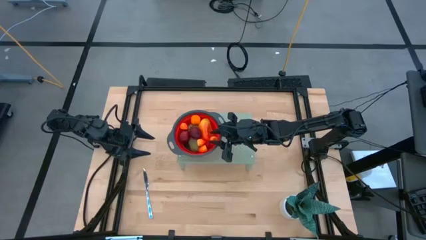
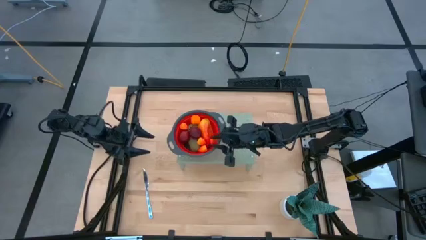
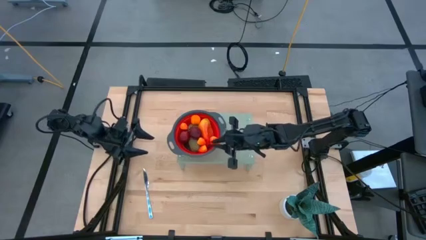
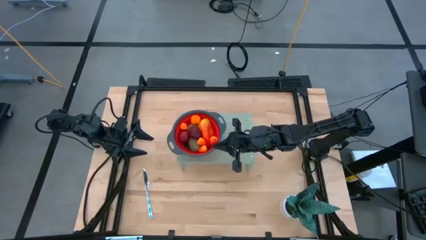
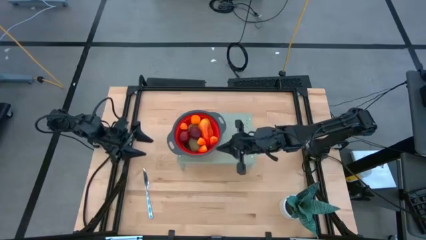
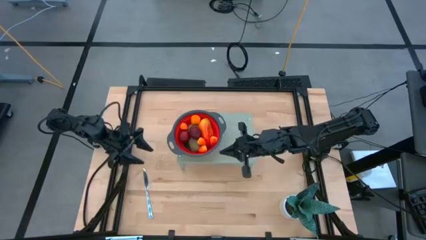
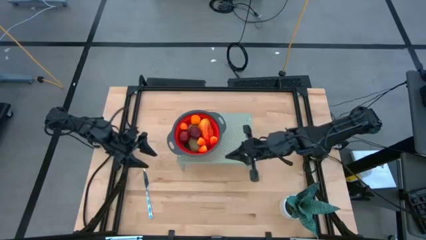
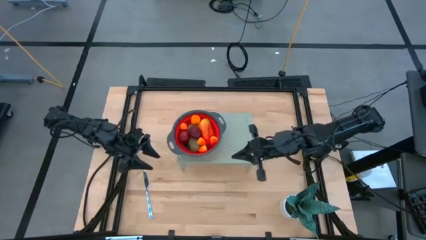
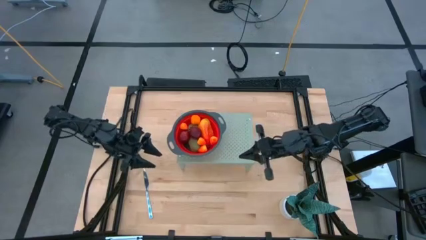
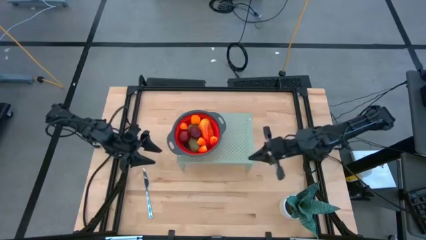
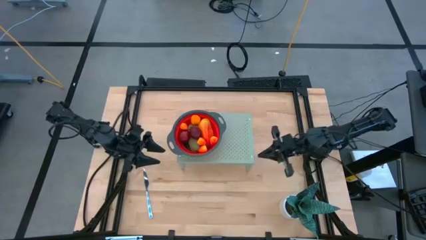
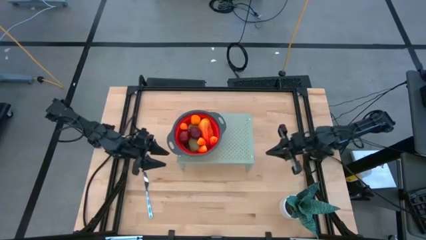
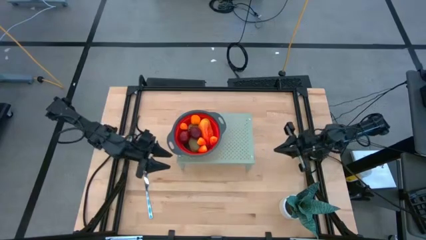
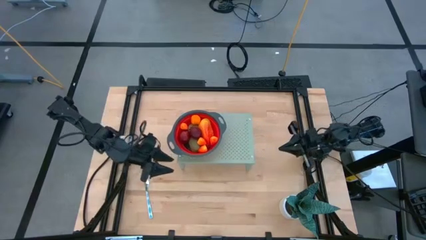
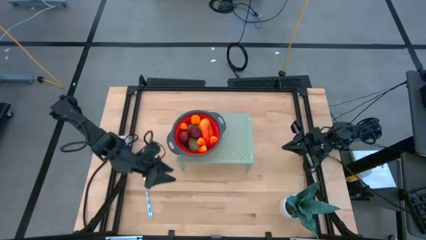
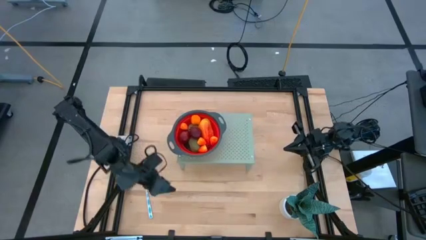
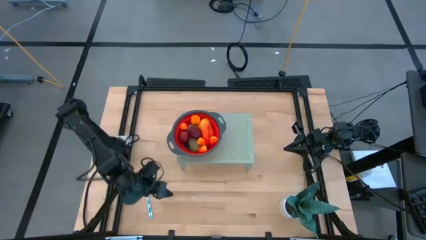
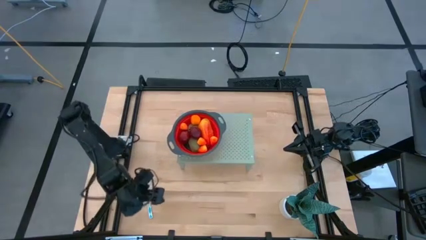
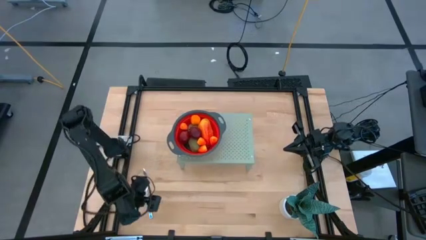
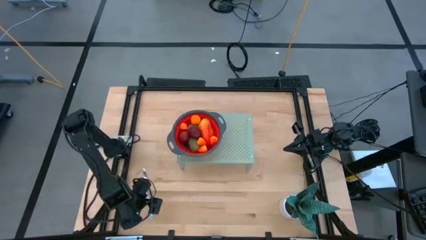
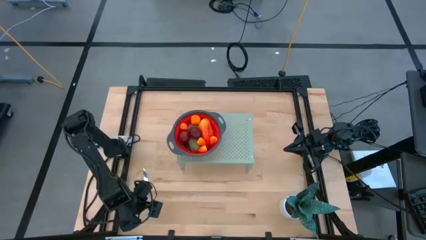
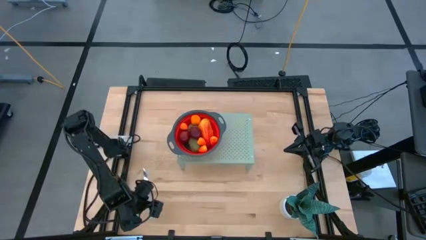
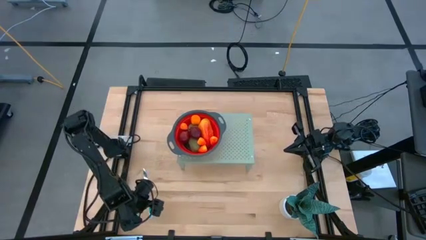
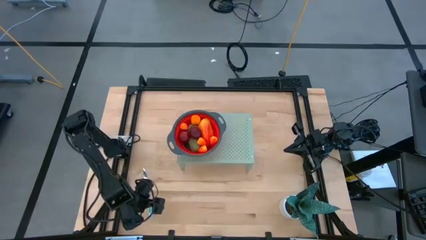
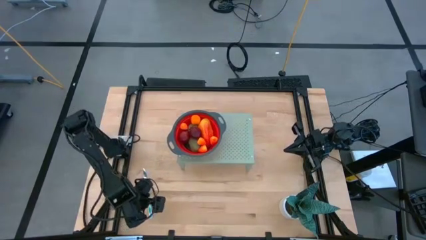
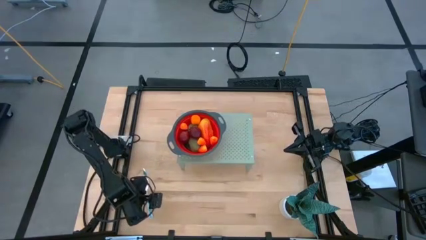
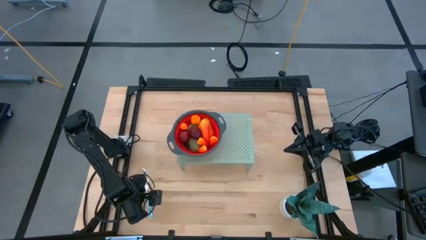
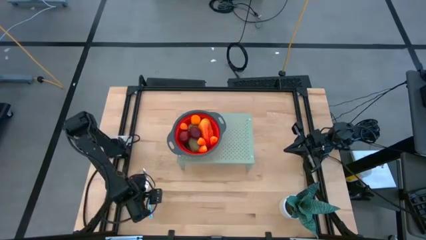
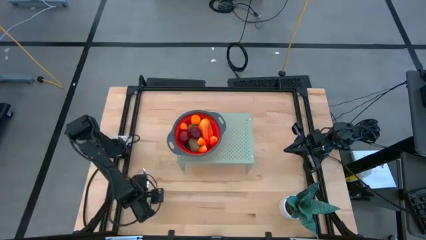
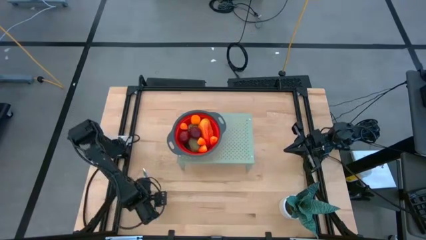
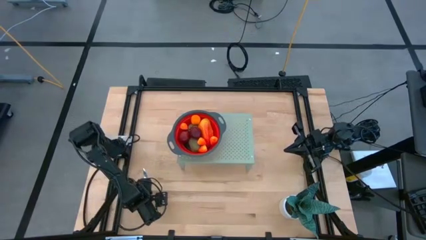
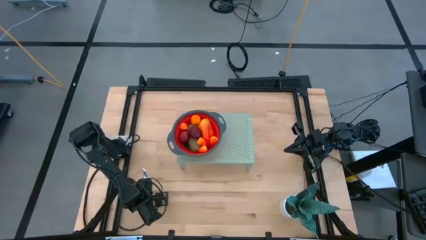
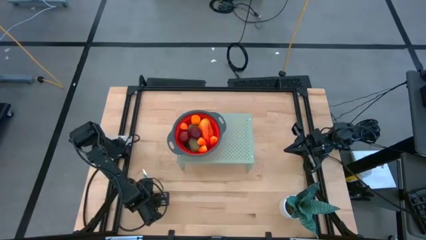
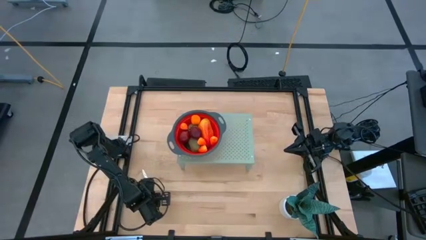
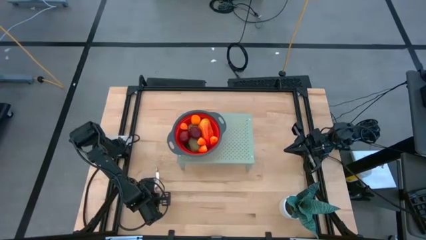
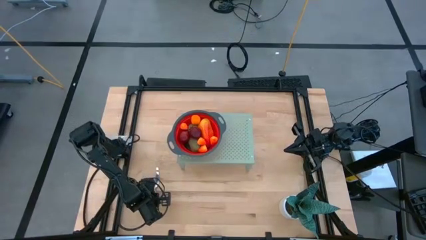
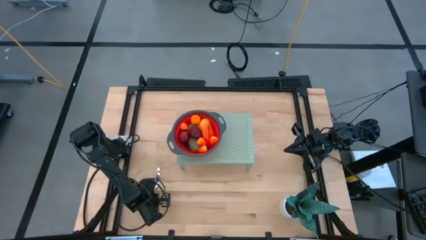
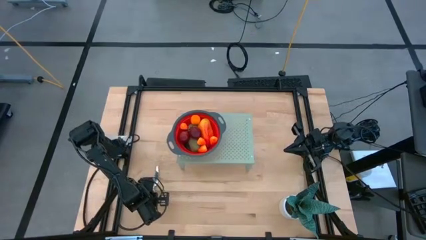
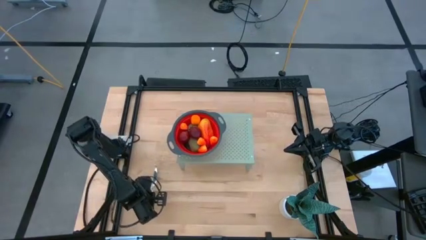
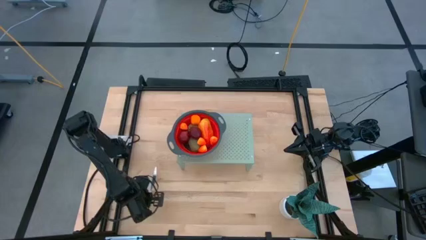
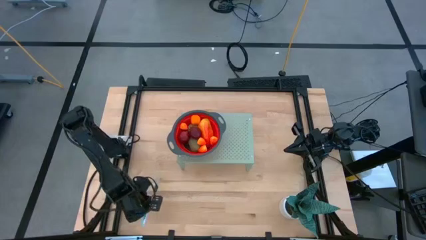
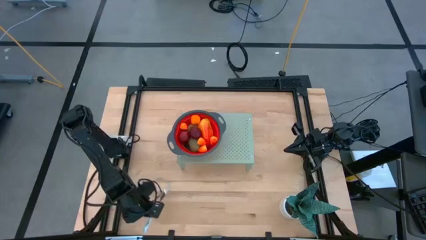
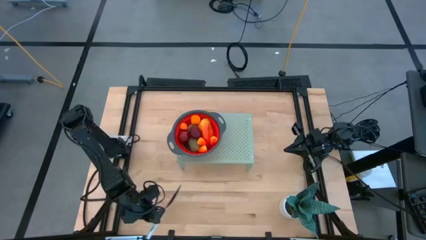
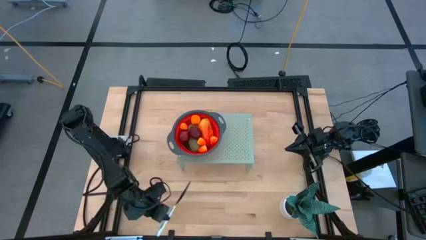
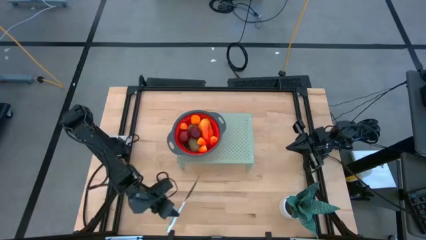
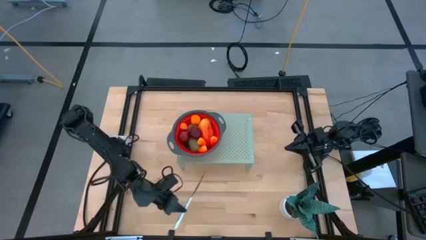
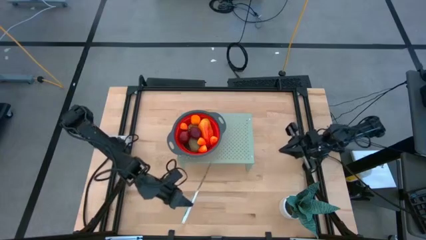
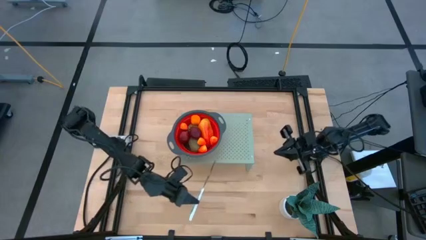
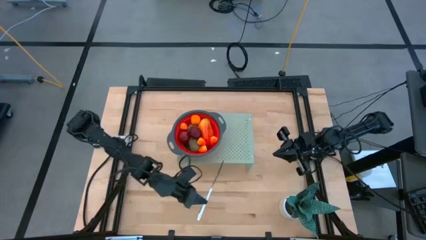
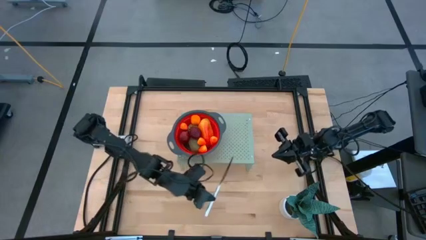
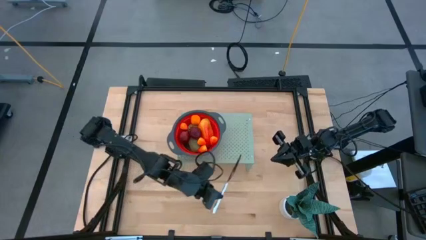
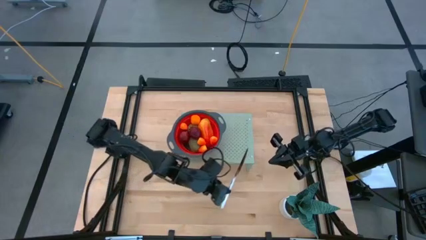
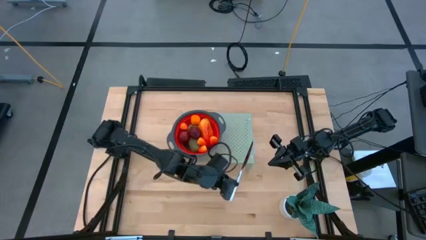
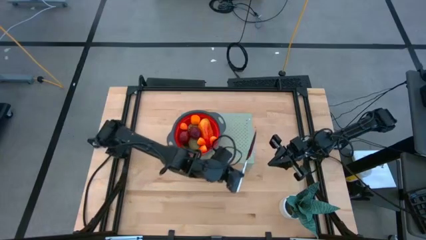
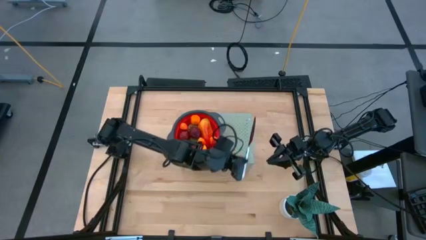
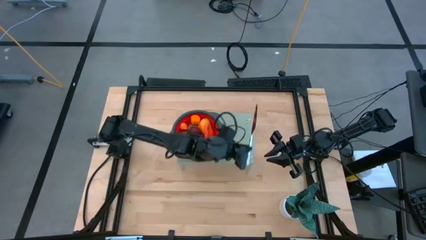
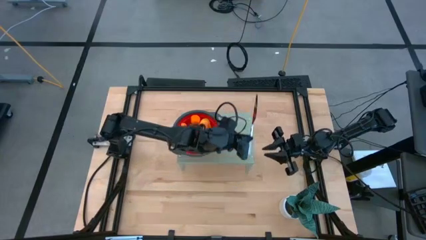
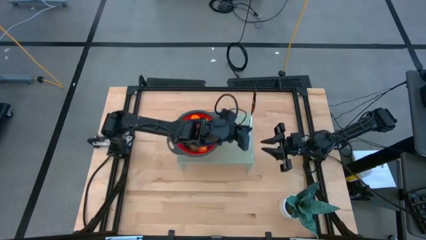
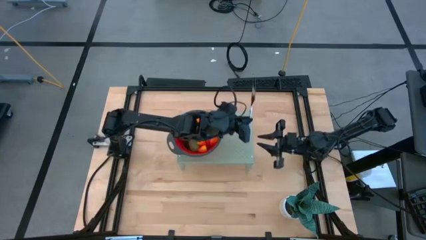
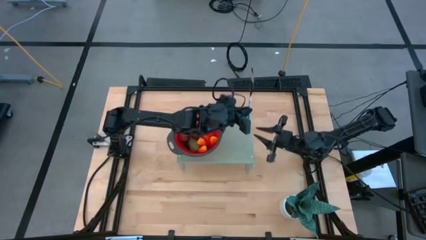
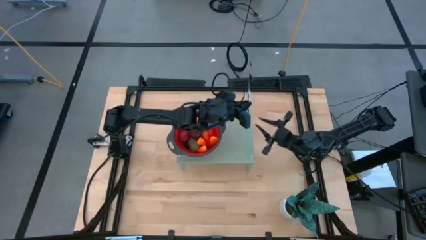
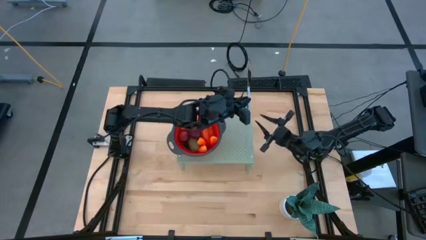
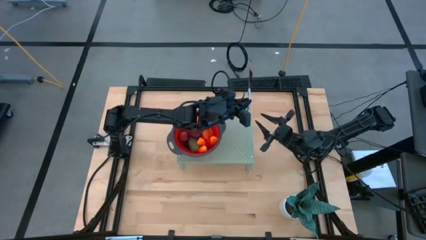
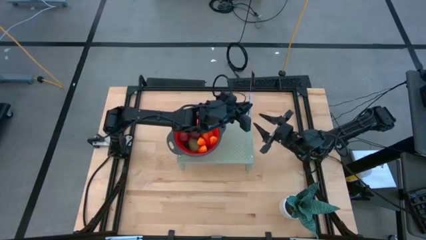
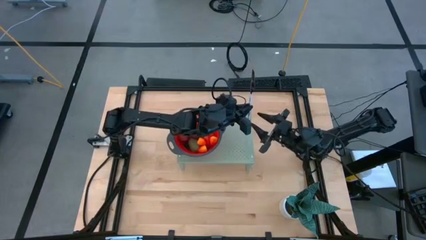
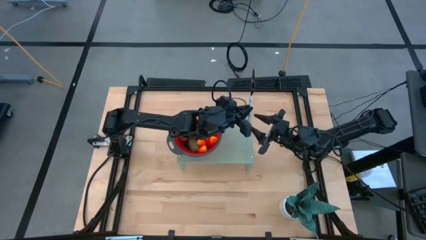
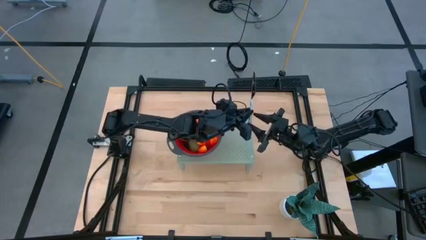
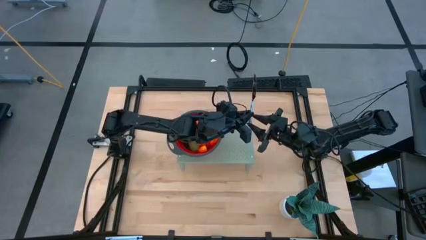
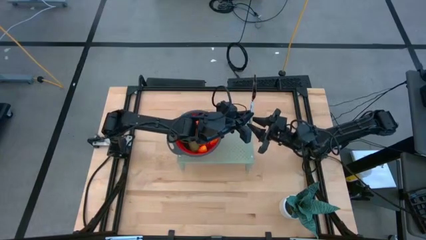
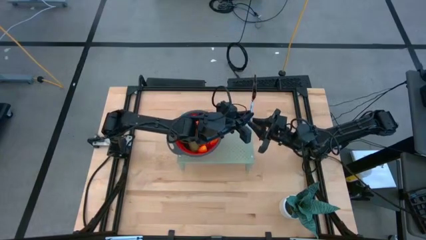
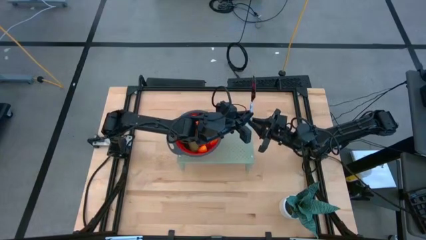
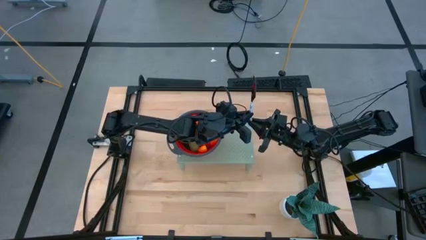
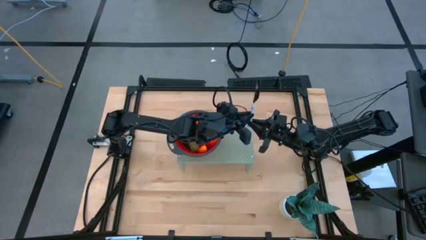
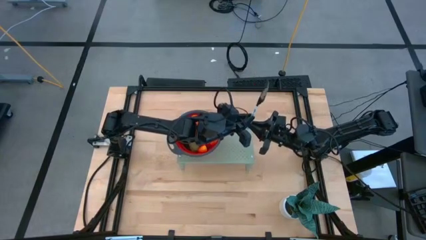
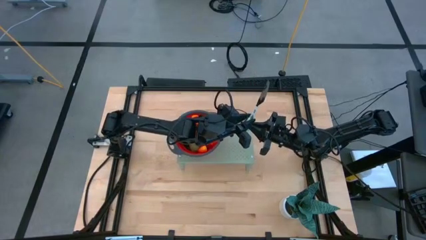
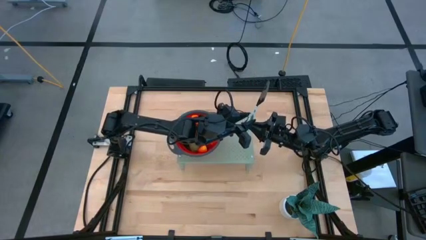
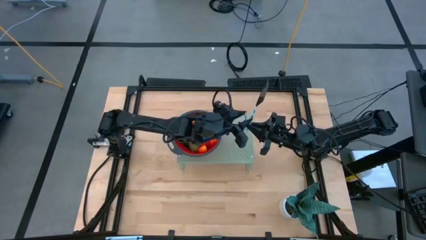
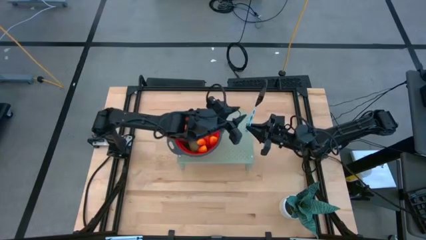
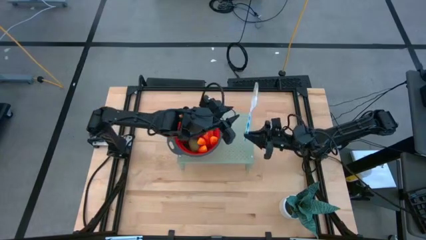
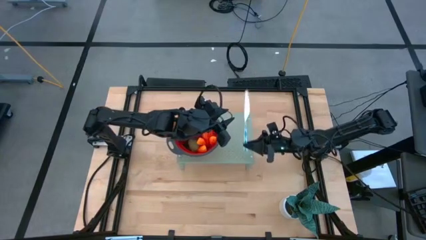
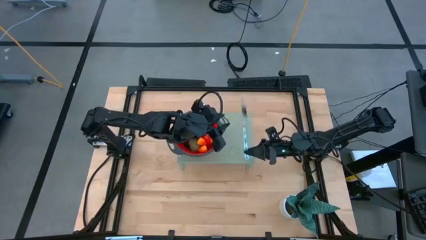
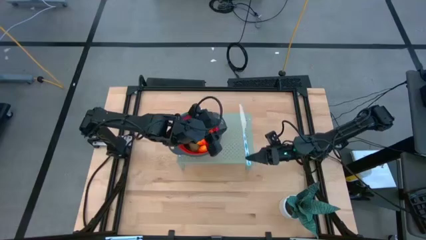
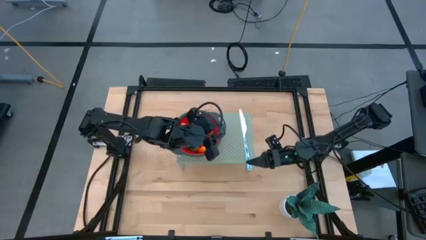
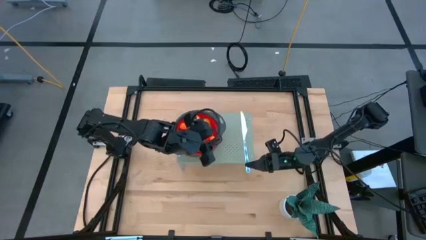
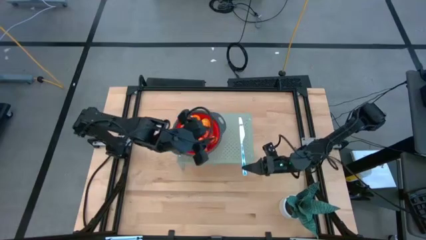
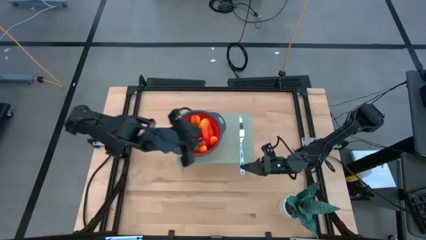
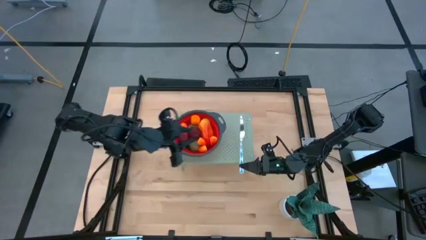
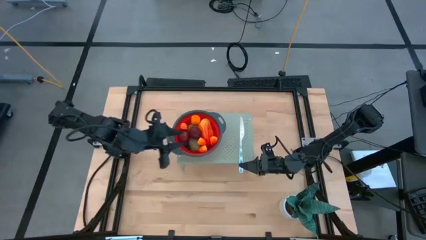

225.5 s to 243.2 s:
Task: Pick & Place Fruit
Put the blue table knife on the shelf
